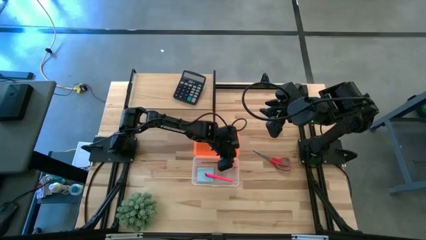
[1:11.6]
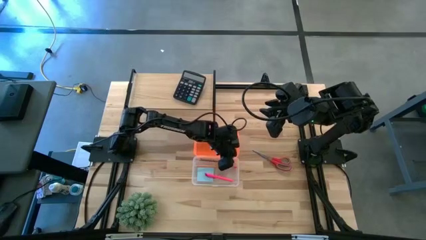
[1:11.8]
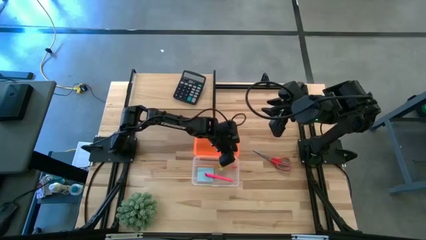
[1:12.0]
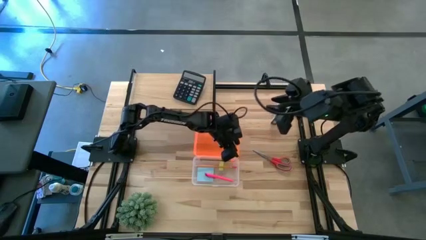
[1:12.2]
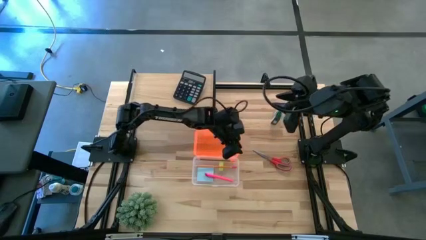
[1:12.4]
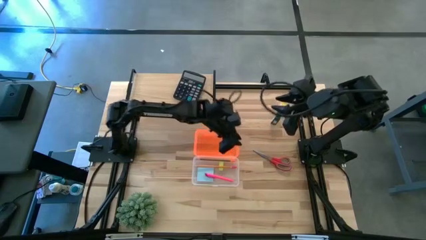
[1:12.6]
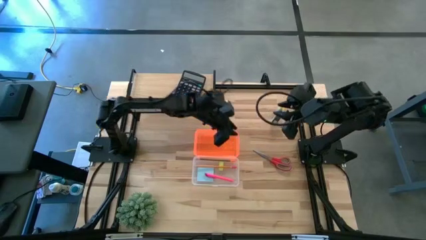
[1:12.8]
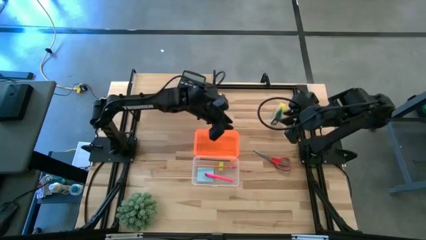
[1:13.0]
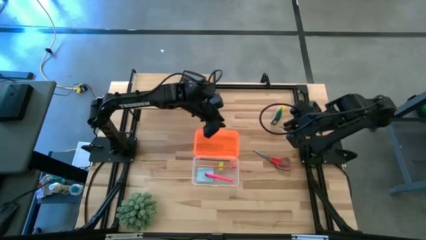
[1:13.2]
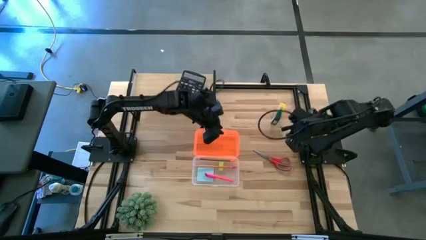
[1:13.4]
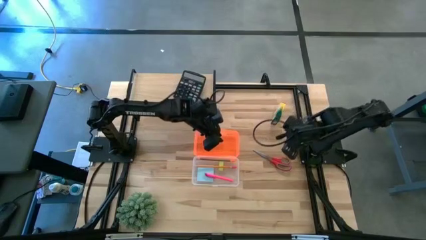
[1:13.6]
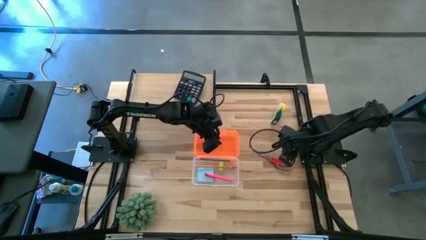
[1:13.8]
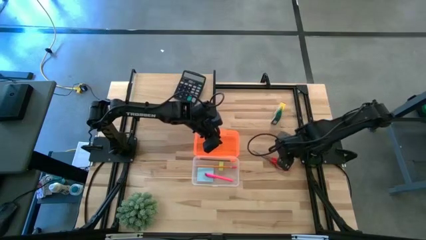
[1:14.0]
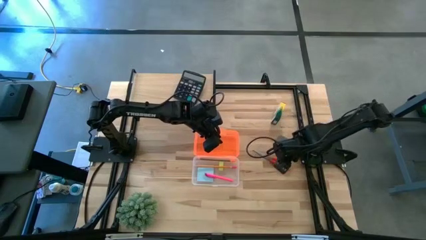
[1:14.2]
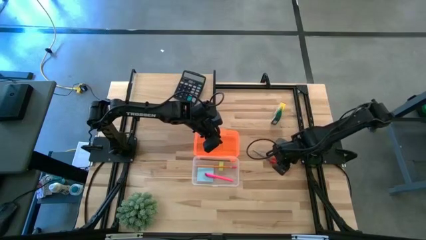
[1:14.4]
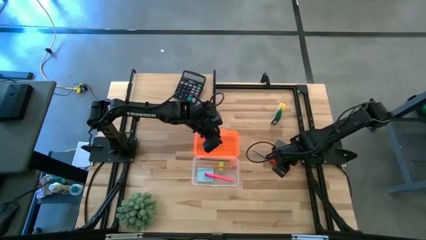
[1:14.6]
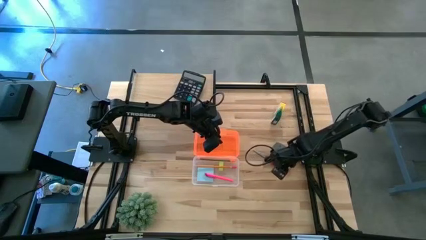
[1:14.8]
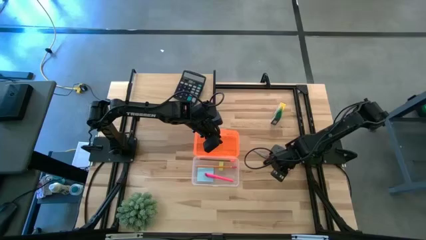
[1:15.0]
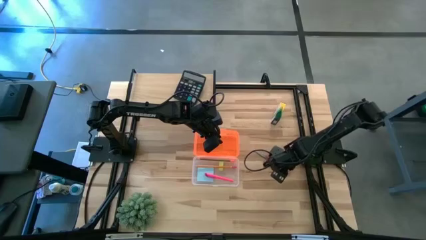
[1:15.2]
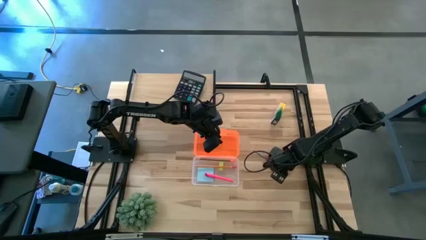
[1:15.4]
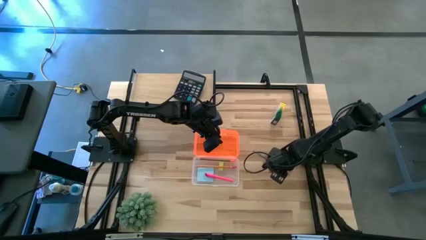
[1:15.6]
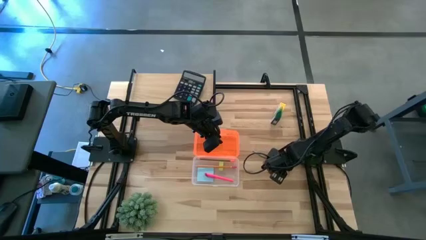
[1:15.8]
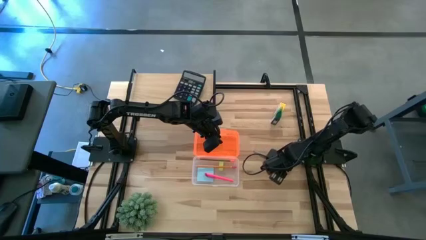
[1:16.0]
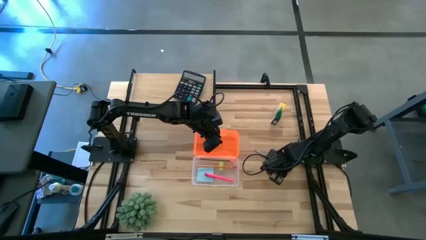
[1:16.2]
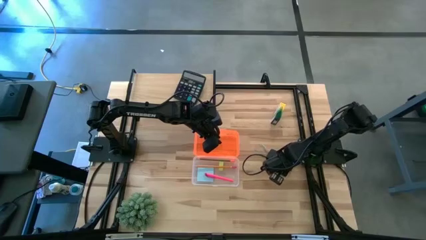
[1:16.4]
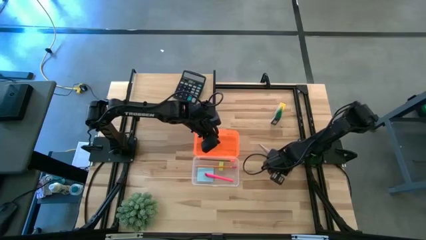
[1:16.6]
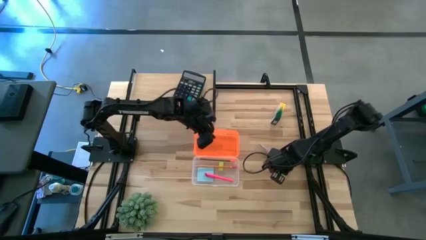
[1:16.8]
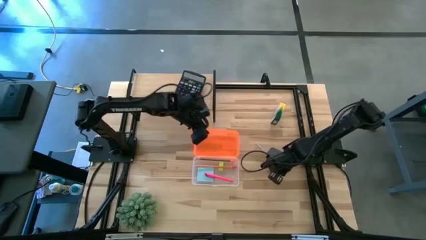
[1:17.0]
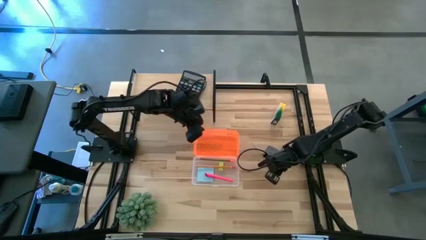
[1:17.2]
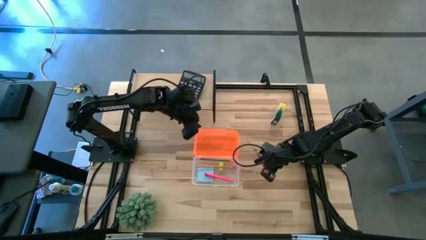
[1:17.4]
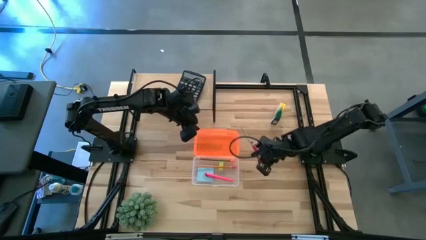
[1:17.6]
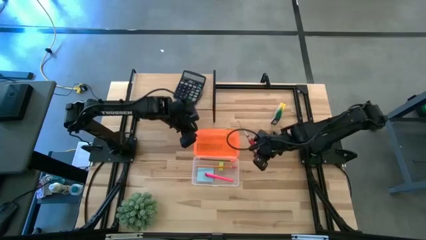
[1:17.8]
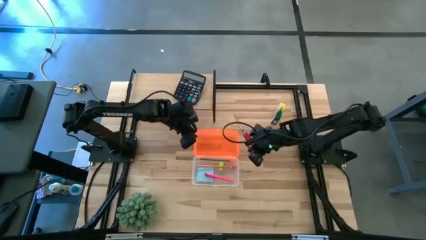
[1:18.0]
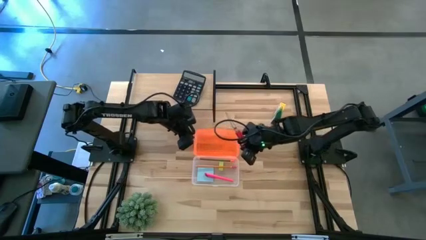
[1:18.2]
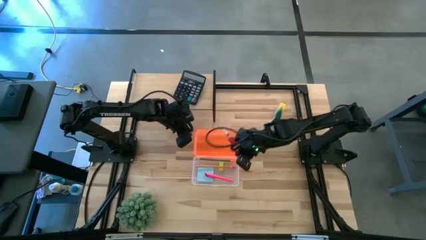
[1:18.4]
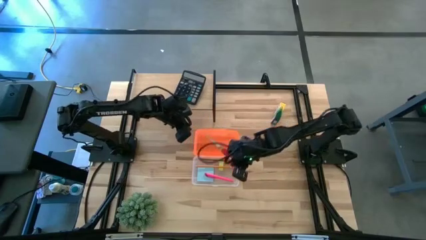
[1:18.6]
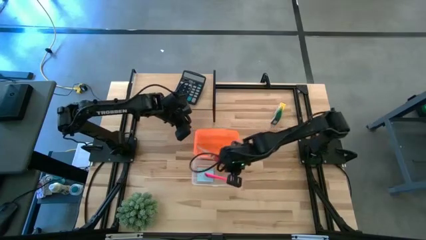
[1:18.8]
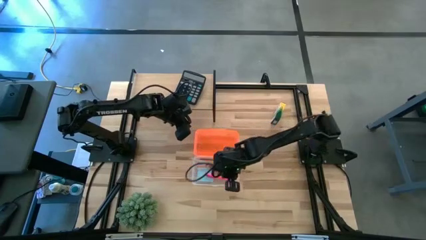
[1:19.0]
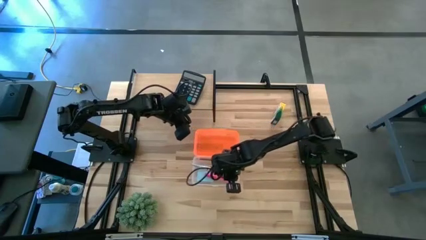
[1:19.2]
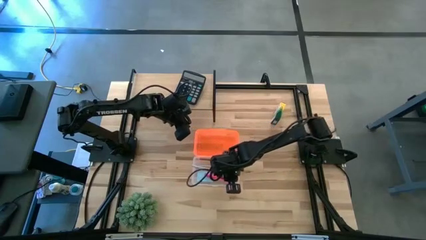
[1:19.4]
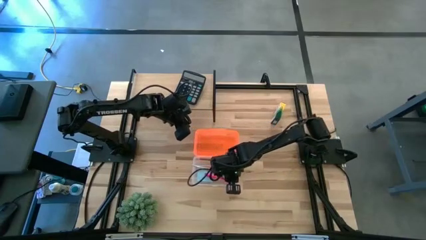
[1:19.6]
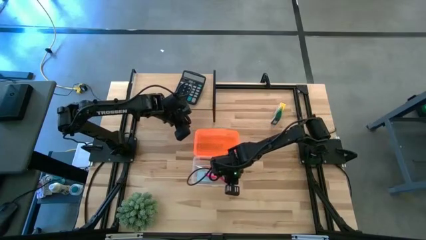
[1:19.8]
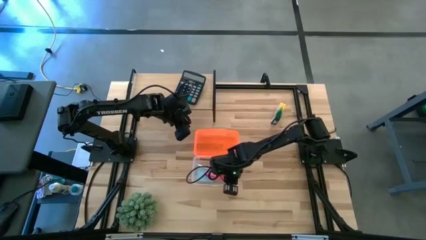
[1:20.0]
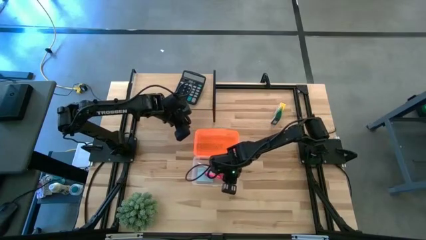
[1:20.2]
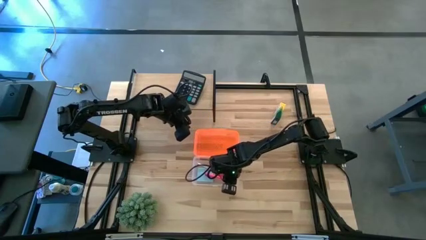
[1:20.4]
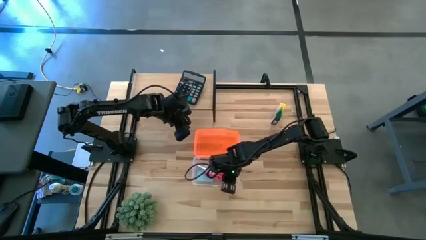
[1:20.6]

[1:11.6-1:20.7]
Task: Pack school essentials
Put the red scissors into the school supply box

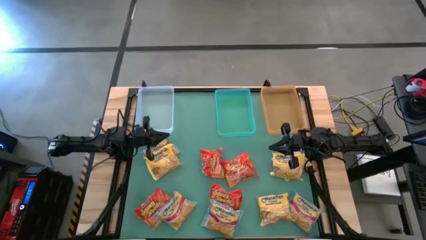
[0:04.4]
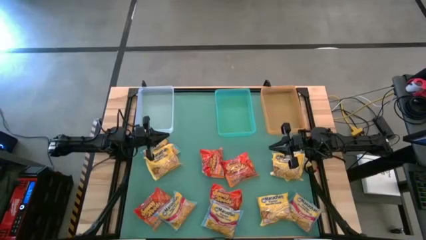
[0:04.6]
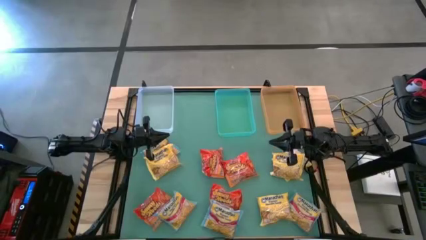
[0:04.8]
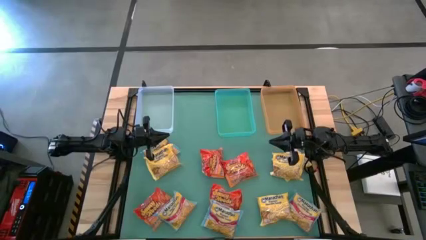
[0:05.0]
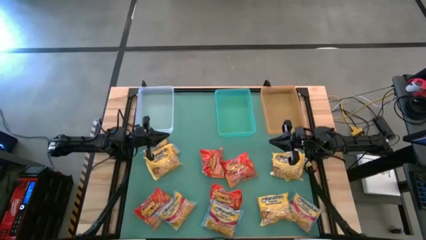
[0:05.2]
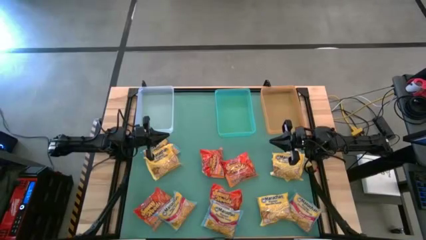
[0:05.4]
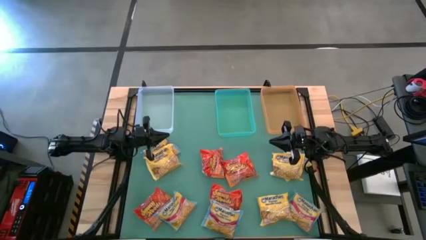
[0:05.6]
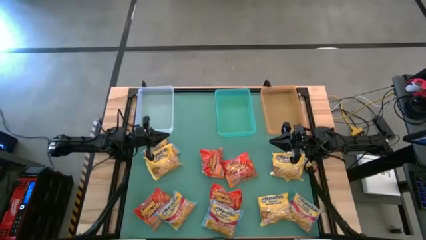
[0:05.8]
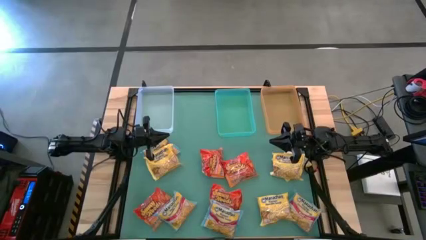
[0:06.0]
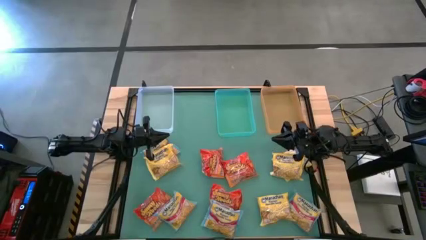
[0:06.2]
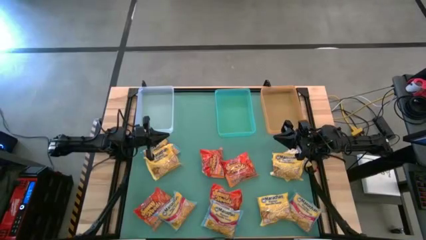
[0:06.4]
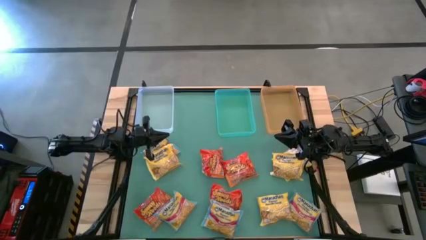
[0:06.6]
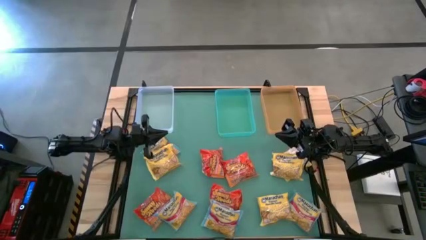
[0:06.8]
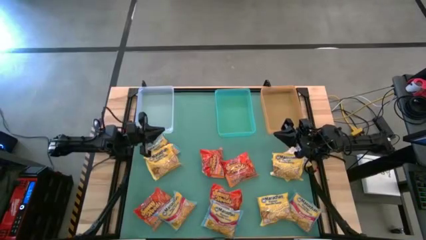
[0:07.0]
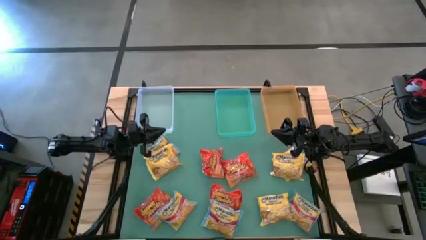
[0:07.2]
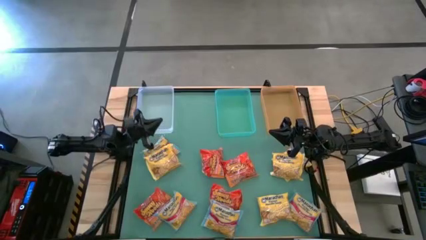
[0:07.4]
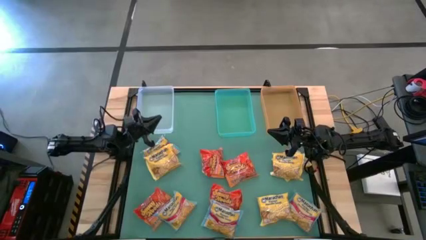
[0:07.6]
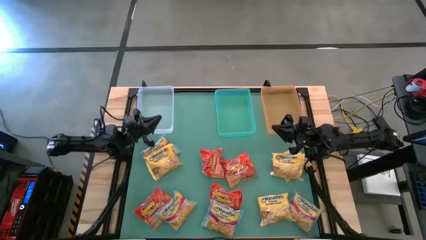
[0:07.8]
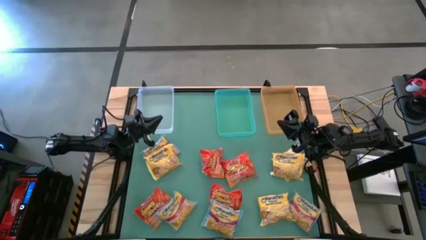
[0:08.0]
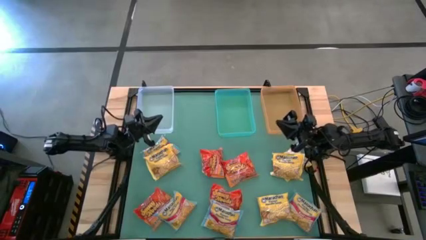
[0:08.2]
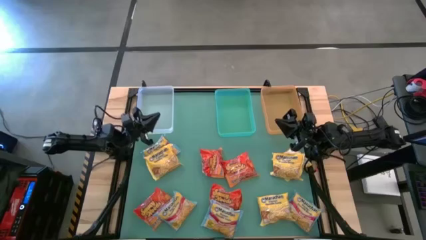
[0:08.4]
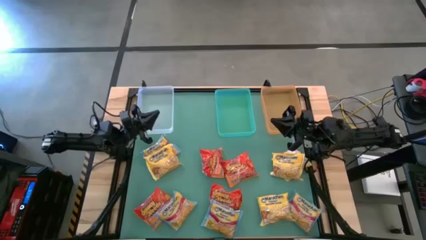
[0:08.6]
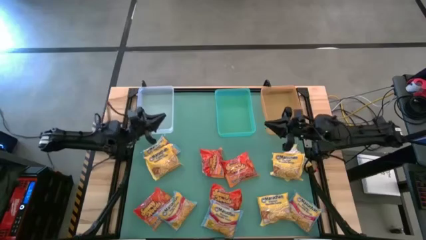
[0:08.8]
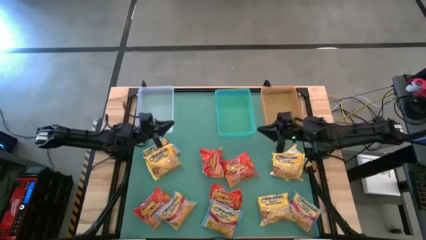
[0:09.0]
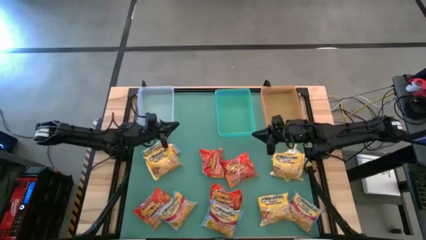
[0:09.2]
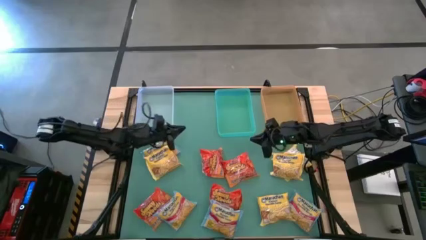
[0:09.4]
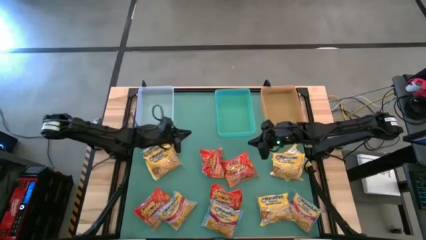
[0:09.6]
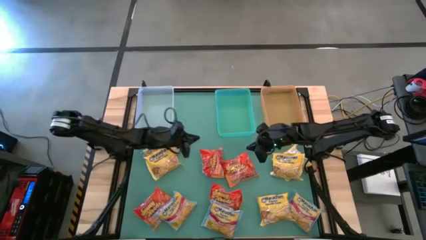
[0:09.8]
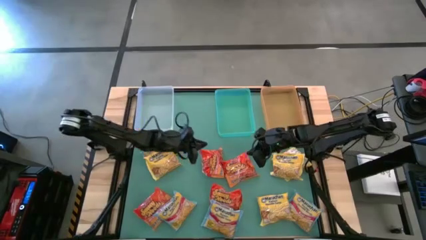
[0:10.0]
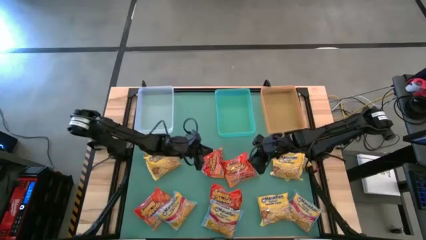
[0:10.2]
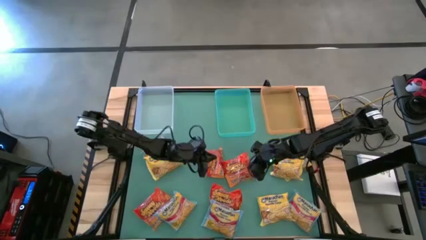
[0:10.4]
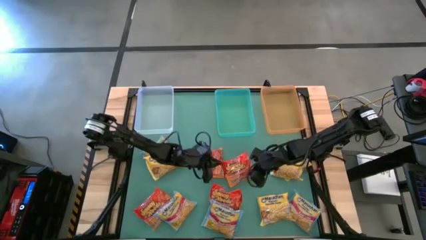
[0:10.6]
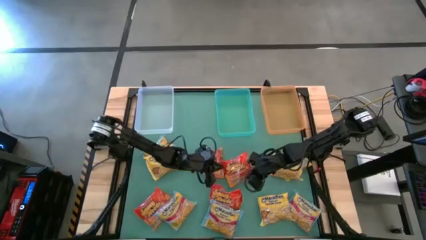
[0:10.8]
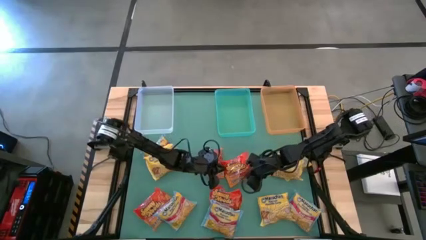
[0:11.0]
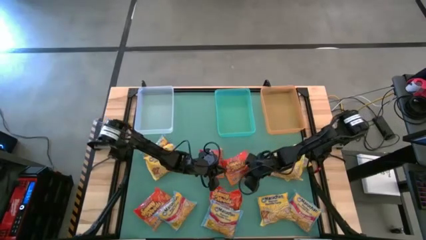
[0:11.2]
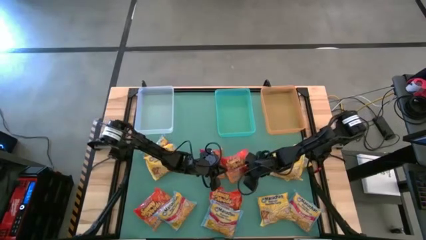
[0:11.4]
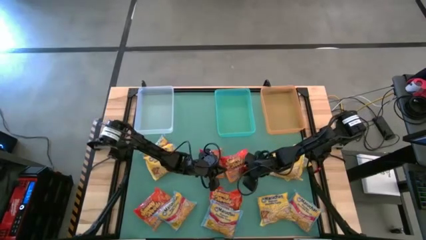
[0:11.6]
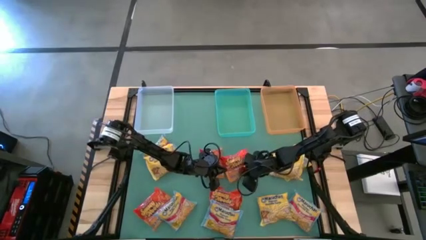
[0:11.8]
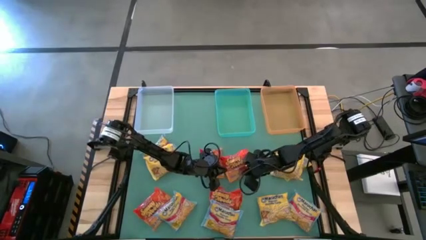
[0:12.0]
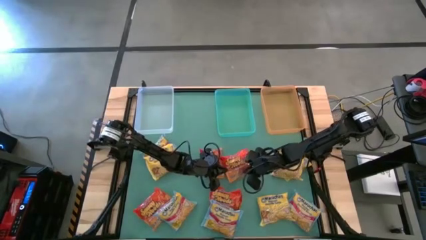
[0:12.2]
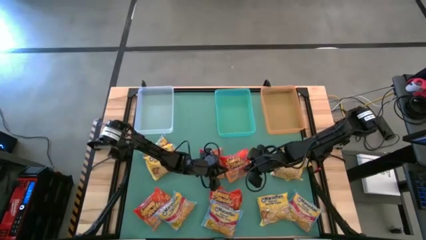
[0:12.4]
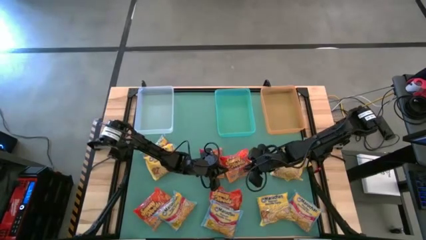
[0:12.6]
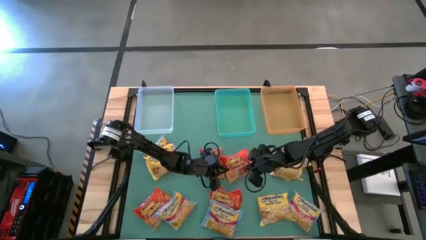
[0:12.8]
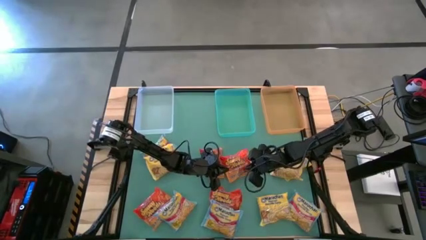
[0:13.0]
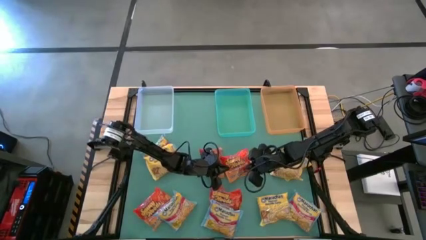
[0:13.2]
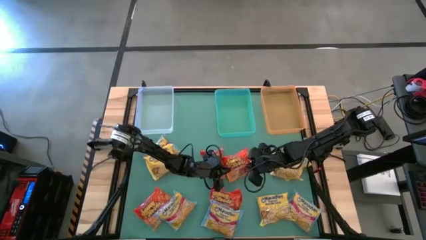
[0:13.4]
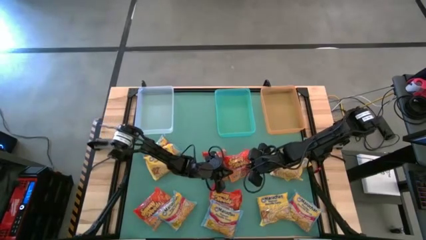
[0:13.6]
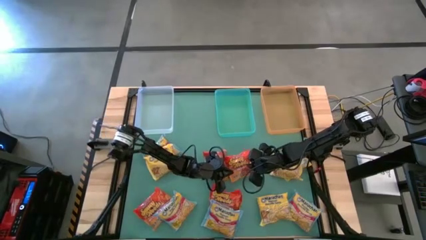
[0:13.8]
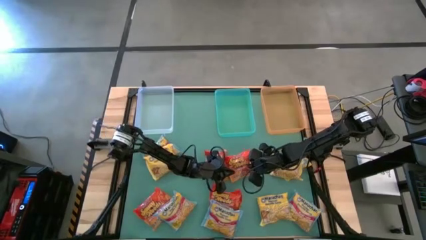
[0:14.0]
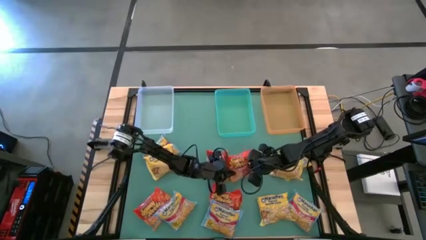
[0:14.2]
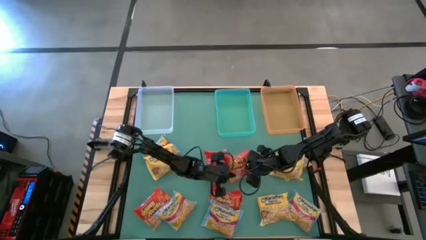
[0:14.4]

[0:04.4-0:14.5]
Task: Sort Maruchan noodles
Put the orange noodle pack into the orange bin
